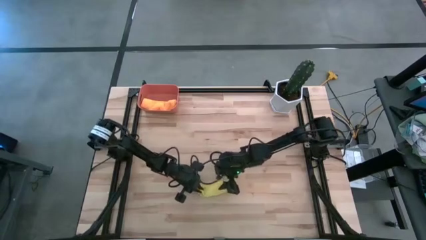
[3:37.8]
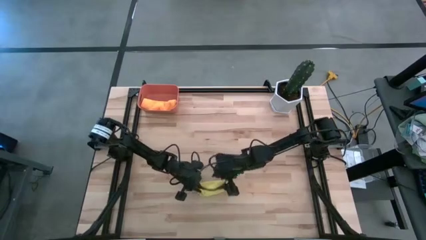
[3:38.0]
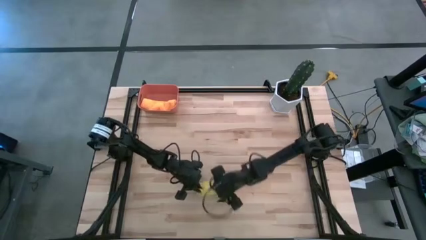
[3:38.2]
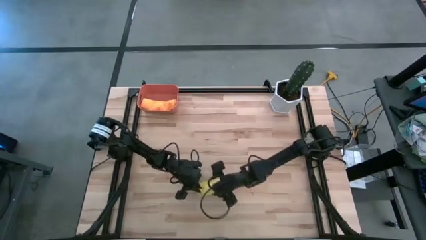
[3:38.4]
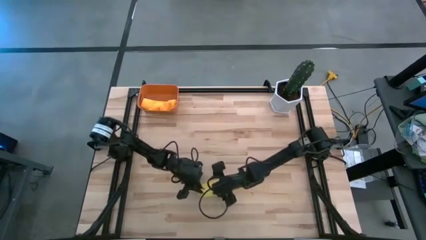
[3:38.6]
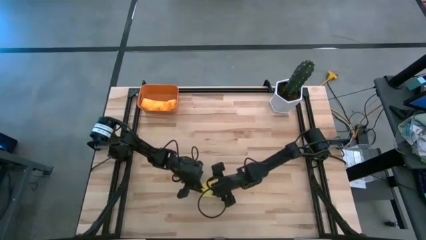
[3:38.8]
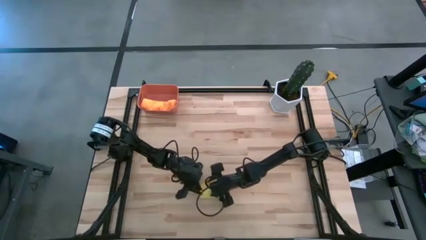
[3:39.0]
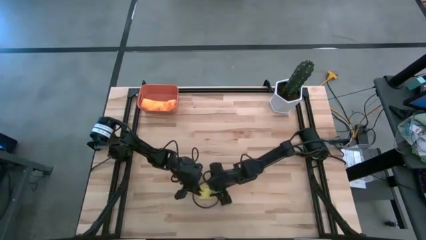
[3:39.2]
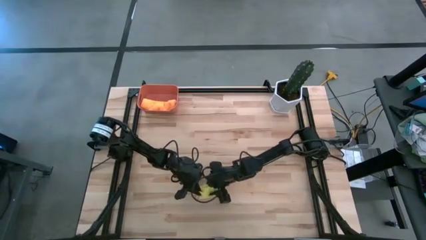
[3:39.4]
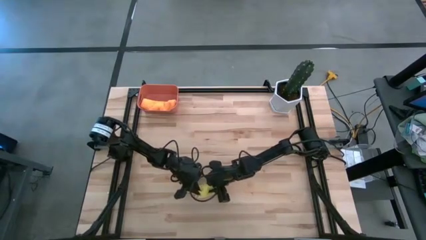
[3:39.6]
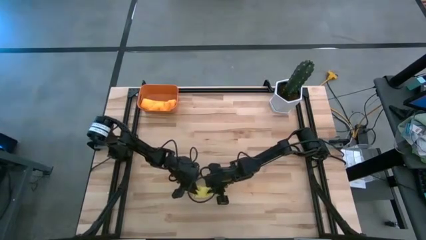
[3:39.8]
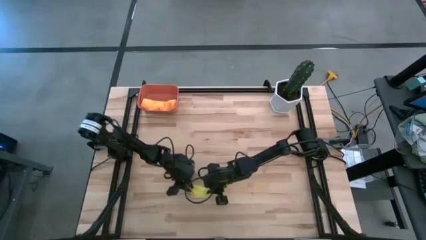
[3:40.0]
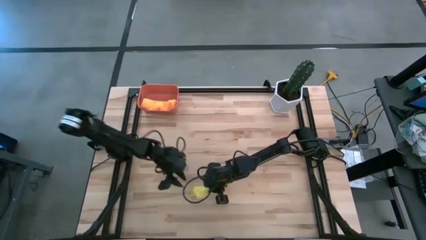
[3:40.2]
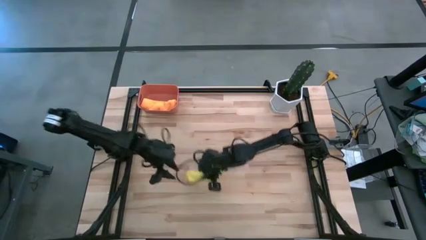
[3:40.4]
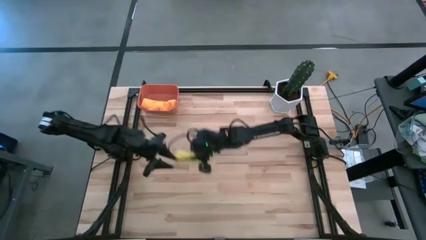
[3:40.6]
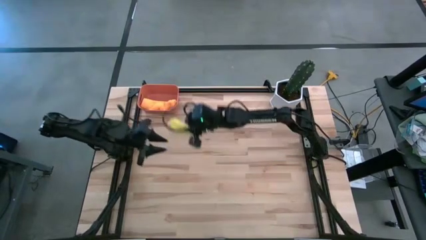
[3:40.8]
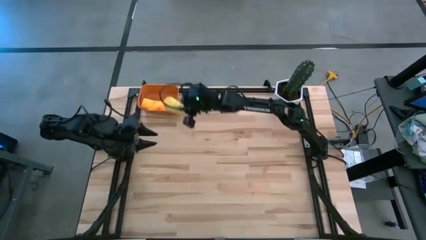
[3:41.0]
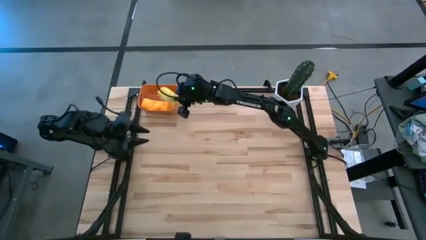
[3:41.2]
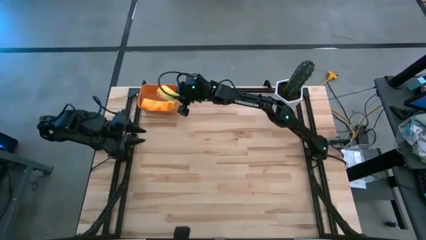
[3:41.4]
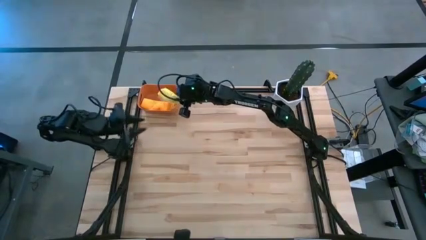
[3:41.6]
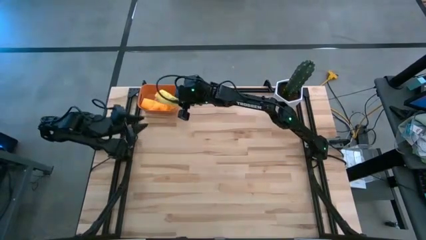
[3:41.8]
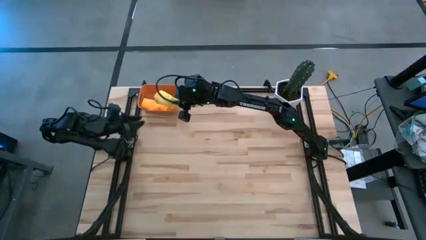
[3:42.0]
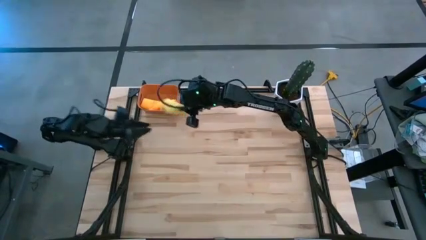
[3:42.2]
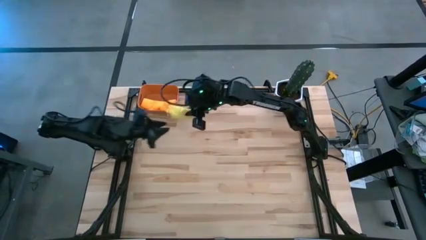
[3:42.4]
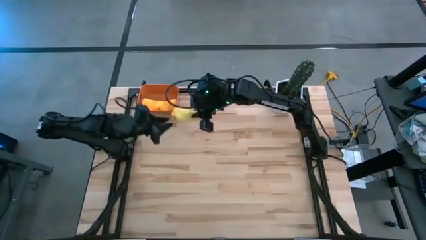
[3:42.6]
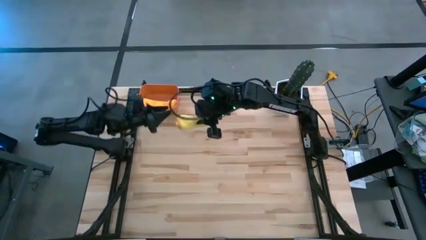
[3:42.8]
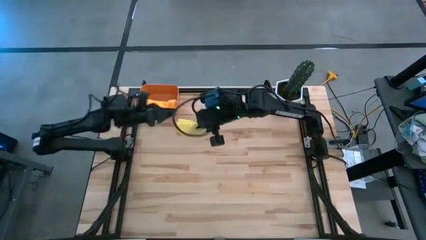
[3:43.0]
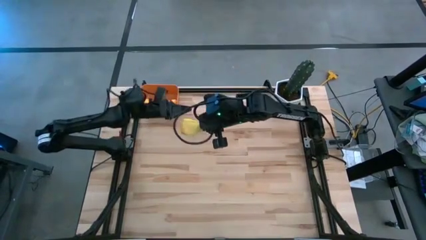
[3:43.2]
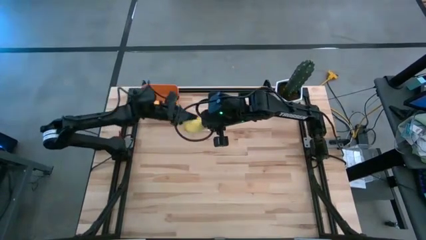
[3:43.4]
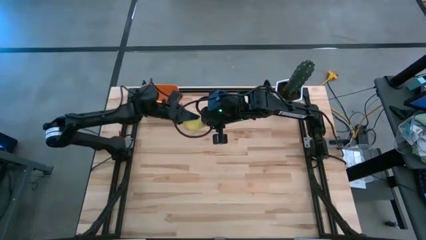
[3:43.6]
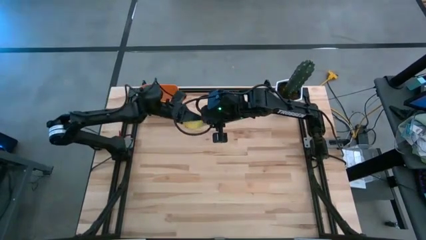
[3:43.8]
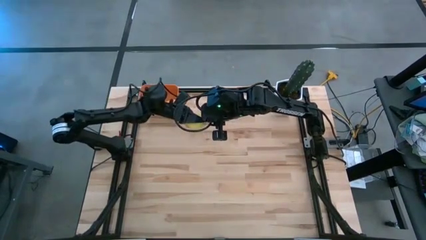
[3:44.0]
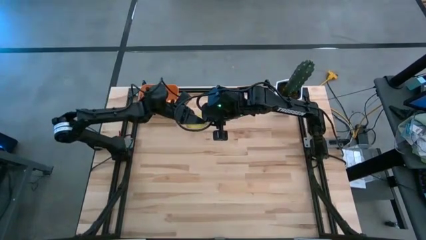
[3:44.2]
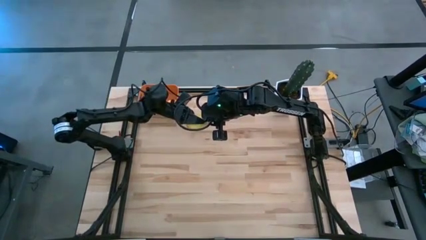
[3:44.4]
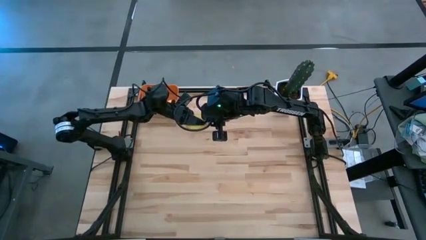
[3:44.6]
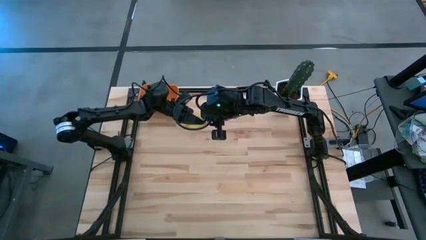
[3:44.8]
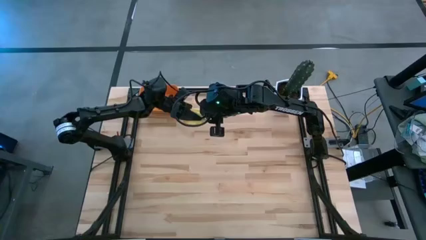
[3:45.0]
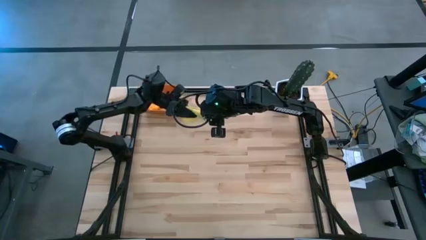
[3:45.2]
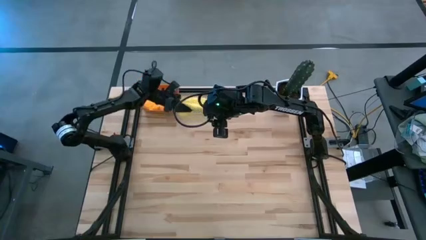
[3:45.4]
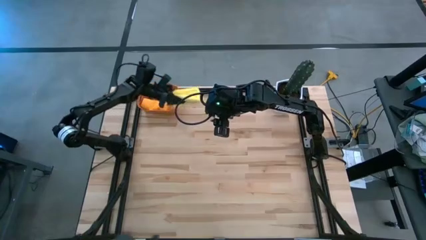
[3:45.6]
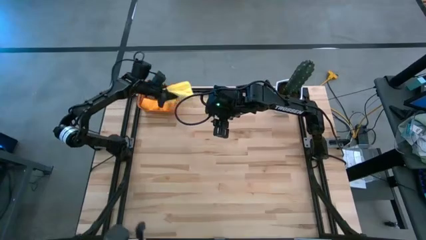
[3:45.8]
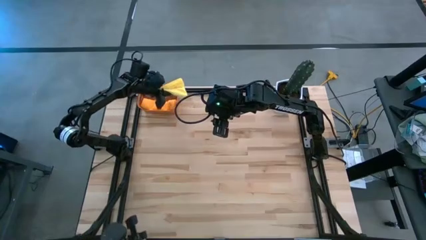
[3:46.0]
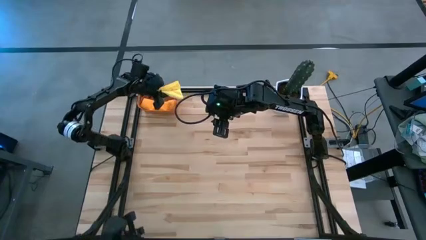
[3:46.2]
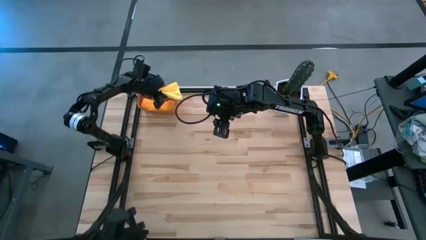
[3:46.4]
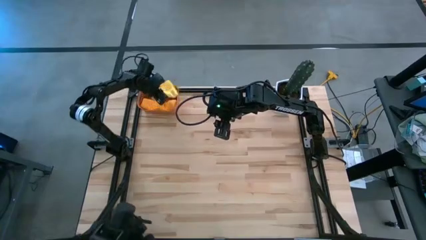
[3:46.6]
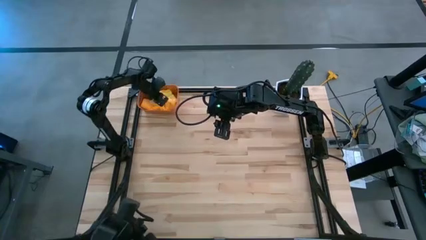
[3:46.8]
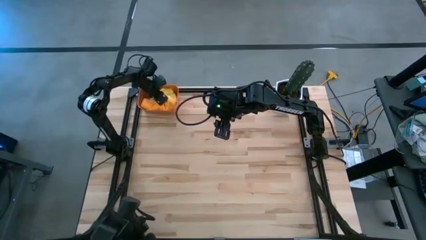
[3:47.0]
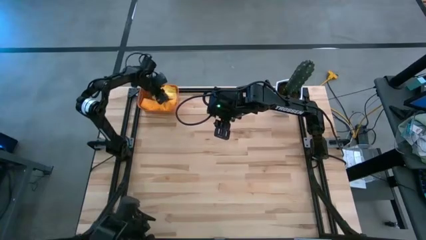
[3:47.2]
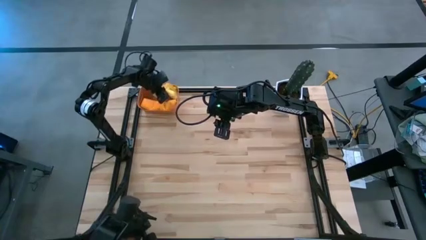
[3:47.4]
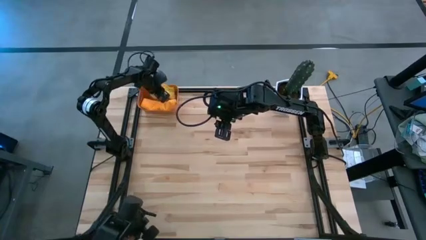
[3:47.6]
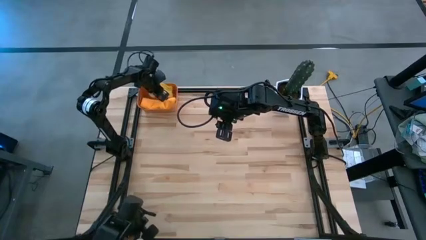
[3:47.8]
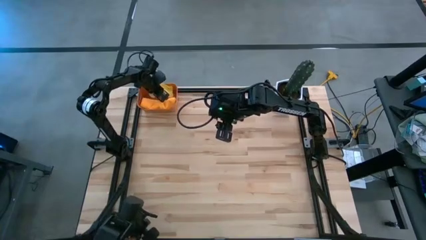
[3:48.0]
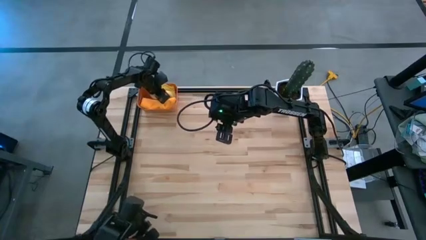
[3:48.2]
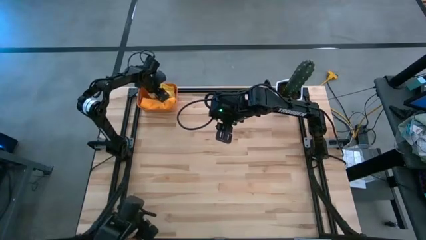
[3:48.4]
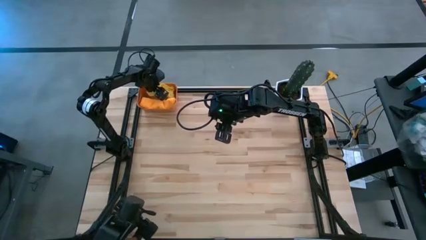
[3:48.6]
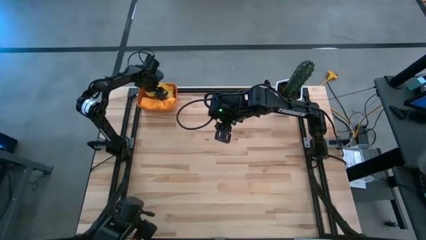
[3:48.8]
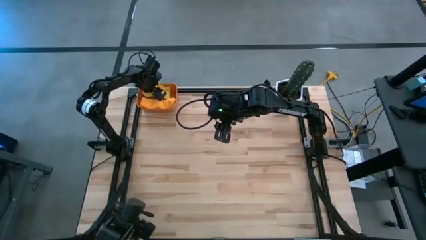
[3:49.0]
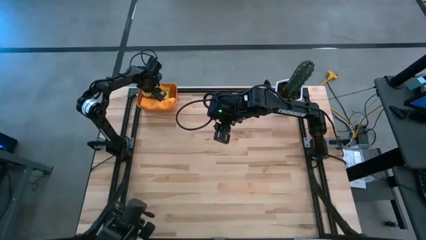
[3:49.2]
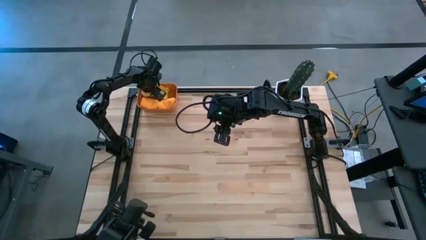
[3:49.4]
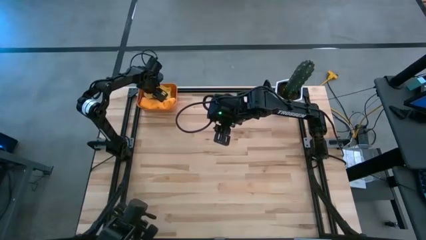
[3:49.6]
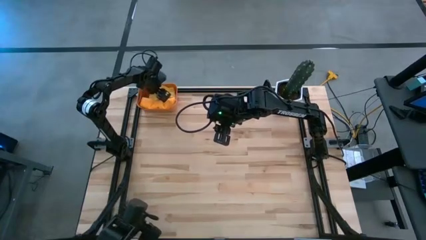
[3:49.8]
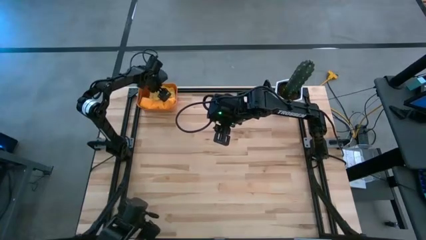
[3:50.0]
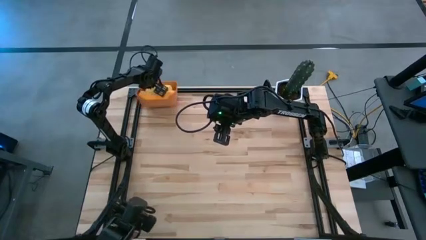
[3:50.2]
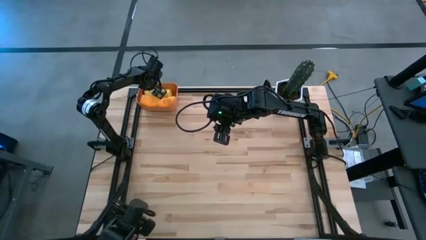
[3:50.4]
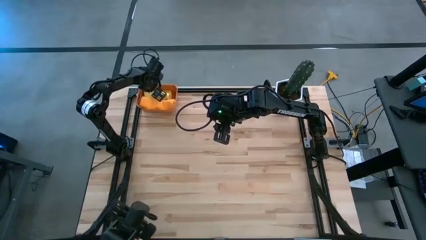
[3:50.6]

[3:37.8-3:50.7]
Task: Roll microfiber towels into tight, uniform cylinder then place into a basket
Put the rolled yellow towel into the orange bin
